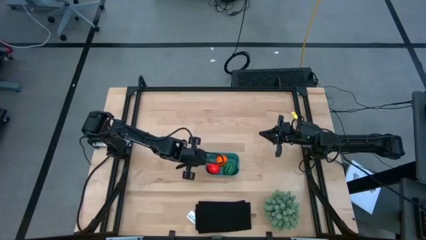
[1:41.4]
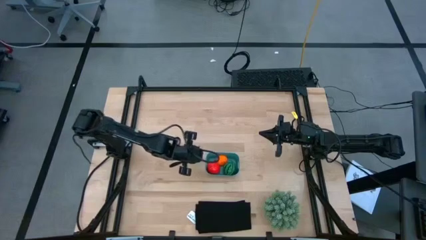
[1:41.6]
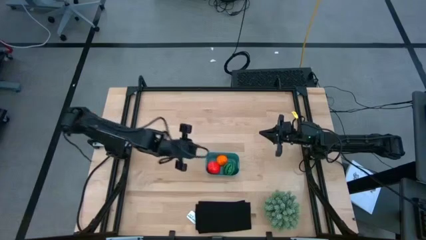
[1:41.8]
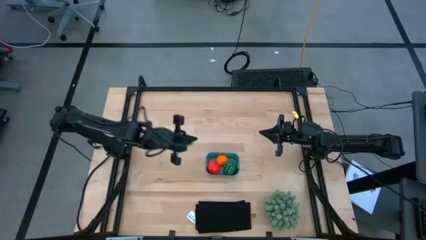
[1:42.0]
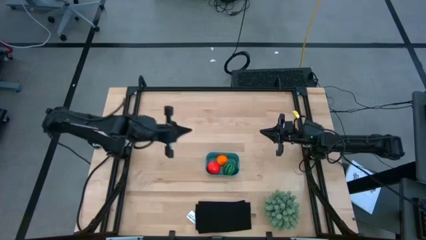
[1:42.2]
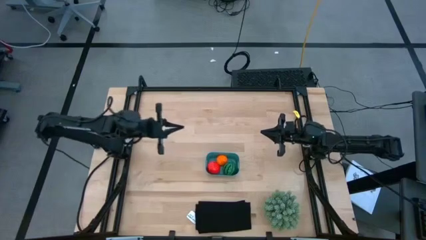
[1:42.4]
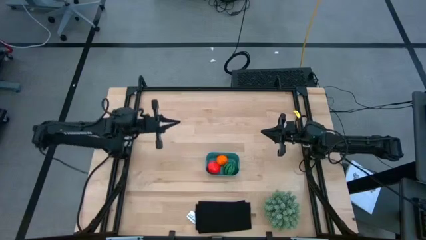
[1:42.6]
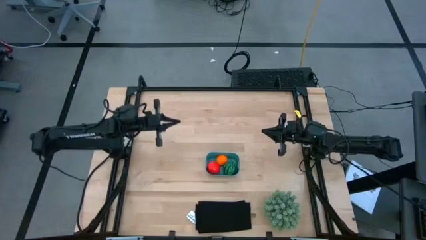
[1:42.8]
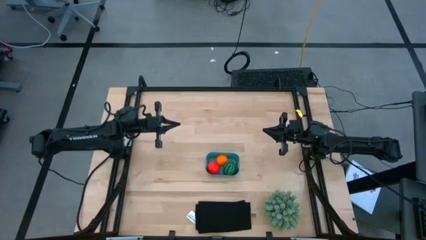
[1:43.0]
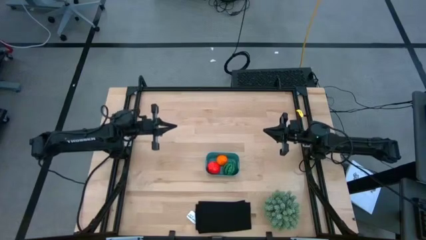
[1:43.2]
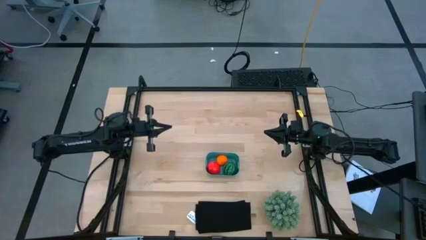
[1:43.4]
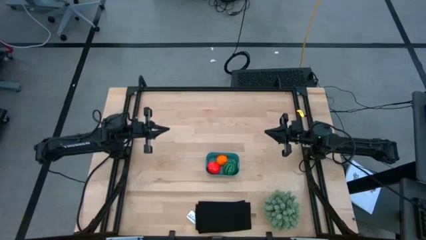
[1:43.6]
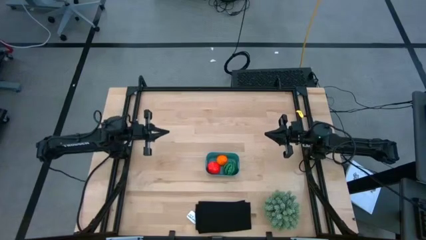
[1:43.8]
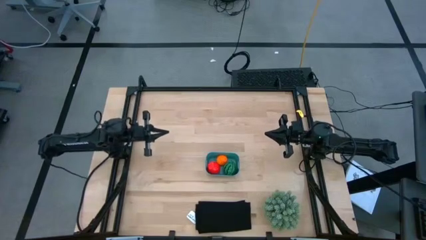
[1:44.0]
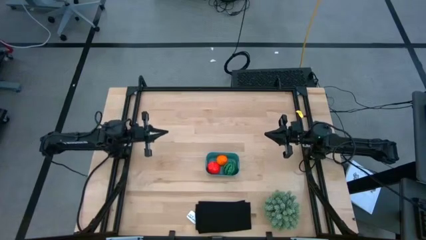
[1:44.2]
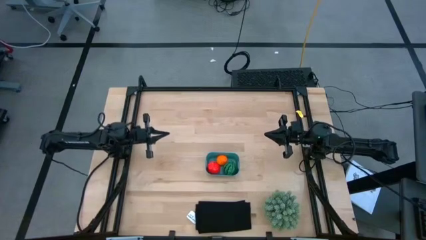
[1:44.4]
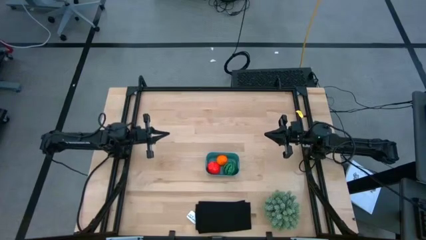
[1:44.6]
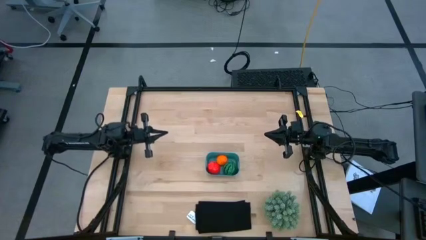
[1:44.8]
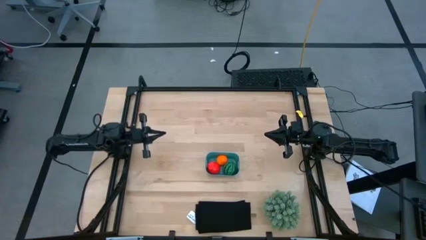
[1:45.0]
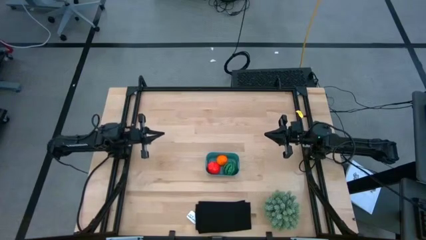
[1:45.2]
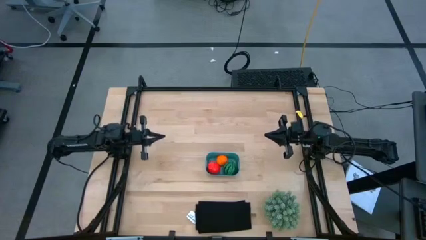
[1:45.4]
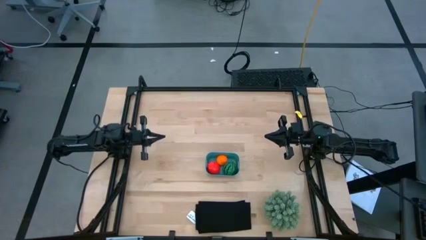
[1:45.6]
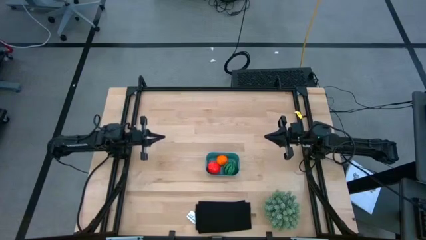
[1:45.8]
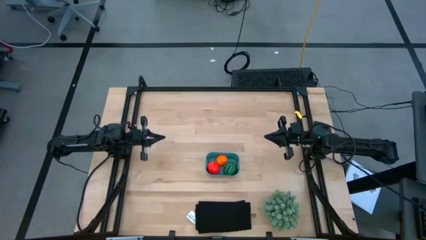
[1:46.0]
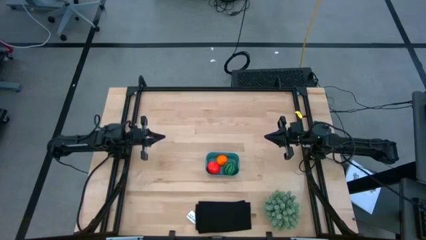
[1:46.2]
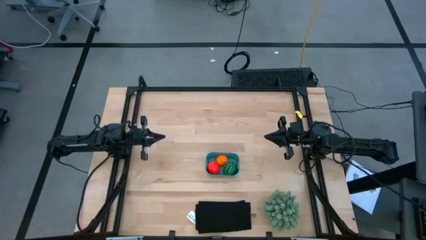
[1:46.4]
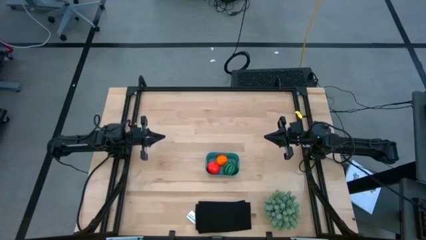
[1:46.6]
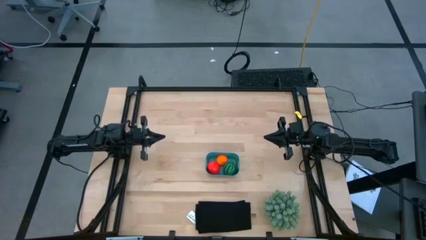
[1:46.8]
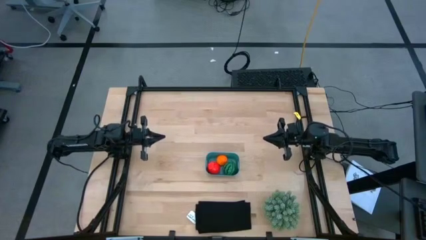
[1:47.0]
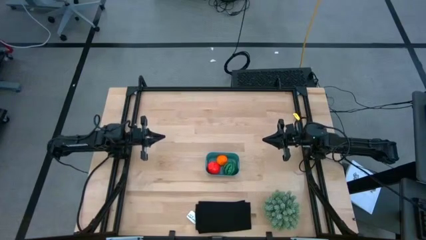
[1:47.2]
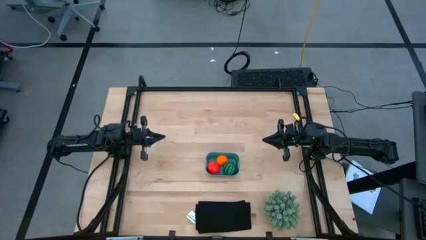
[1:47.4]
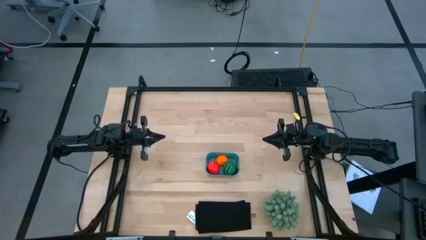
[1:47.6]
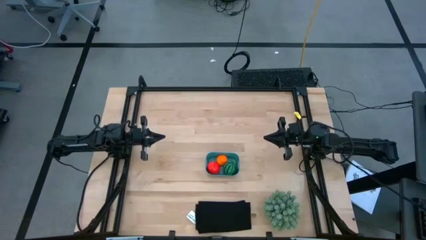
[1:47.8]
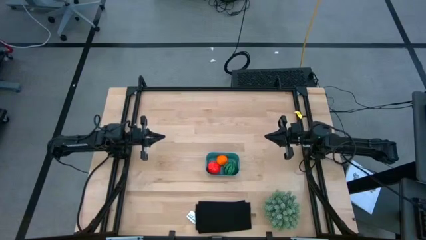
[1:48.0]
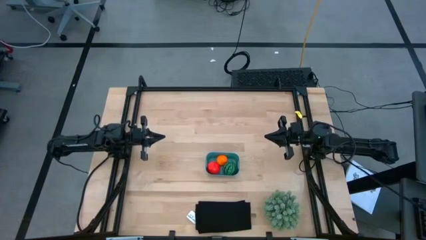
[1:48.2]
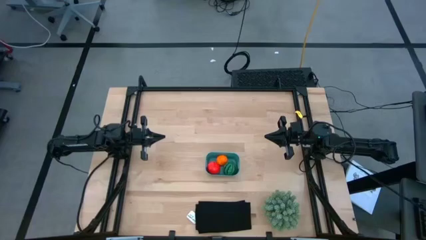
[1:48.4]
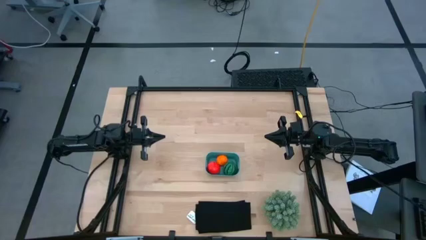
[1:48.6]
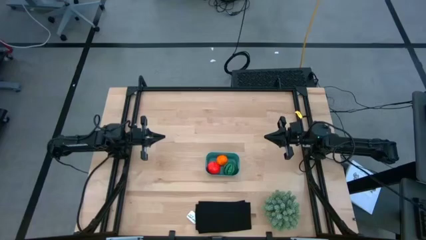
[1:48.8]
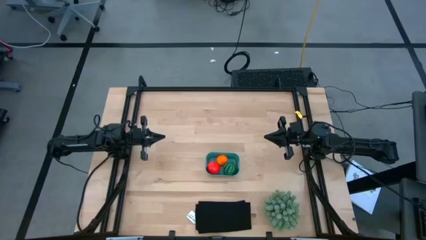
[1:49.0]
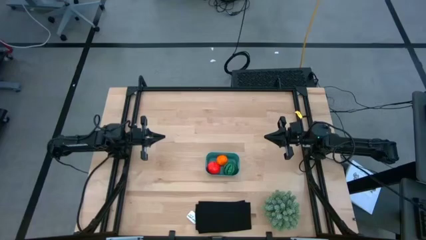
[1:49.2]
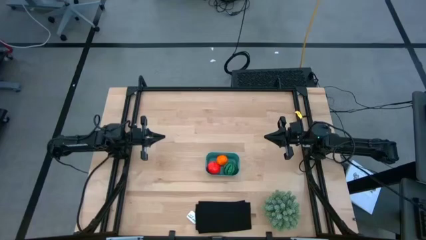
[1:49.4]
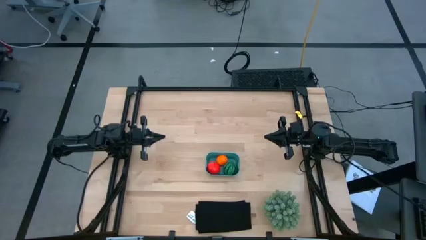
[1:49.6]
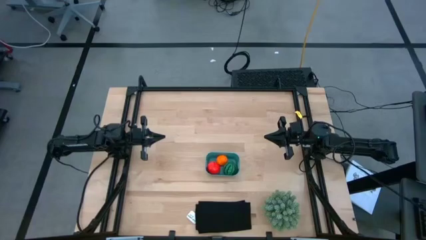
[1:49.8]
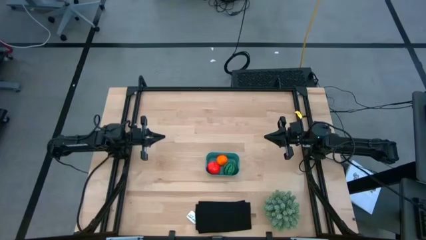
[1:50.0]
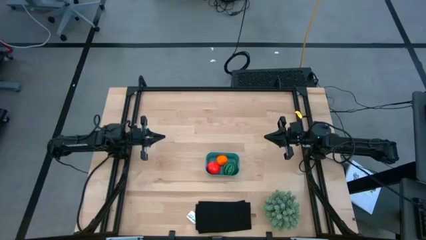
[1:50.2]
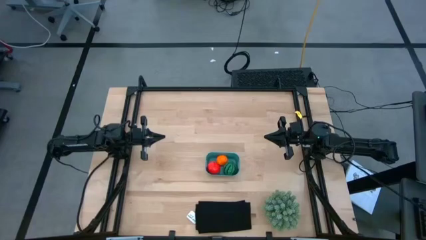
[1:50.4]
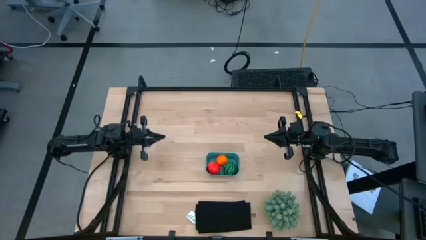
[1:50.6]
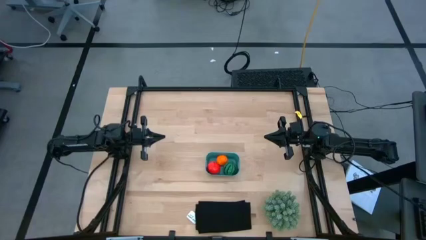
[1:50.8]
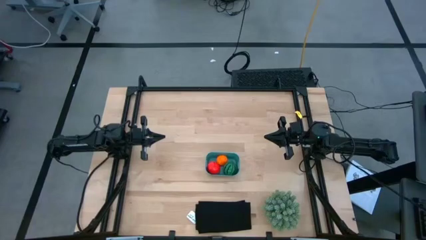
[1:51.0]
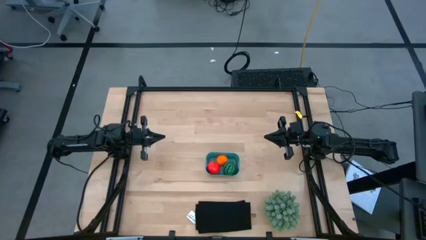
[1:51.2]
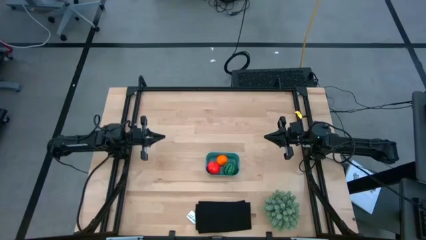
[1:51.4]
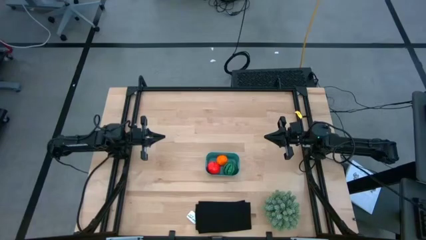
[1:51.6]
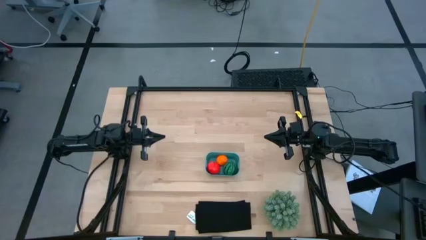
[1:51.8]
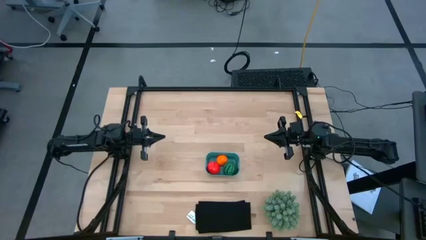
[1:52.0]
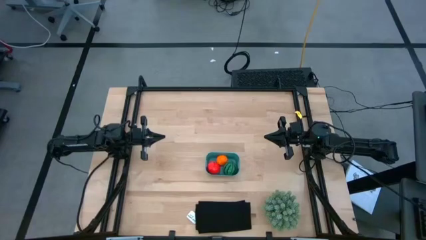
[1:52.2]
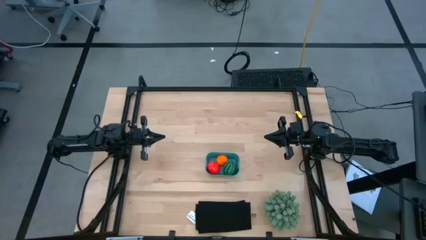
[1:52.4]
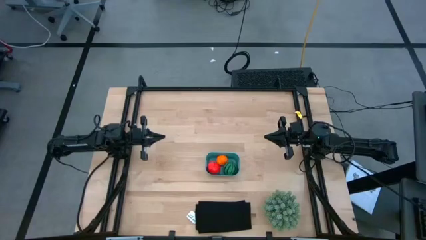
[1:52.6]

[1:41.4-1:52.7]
Task: Pick and placing Produce into tupperware
Return to Home Position

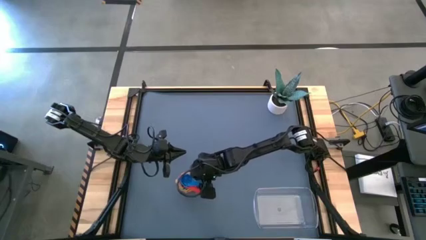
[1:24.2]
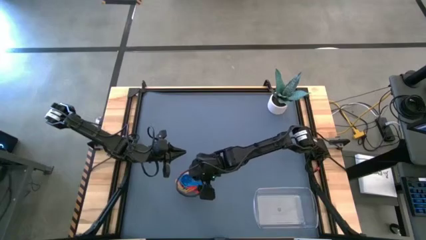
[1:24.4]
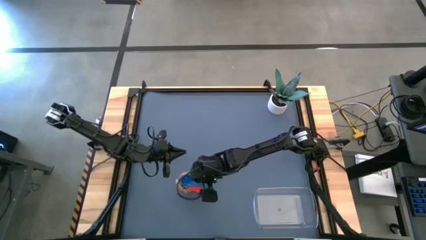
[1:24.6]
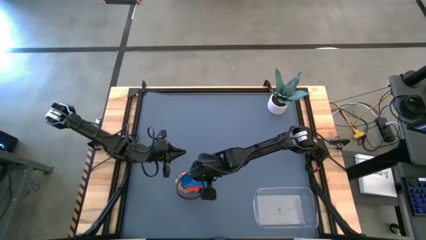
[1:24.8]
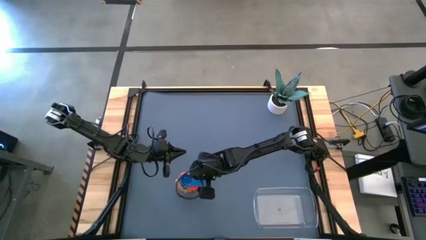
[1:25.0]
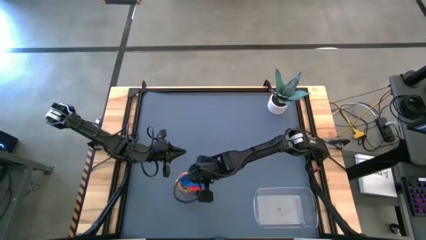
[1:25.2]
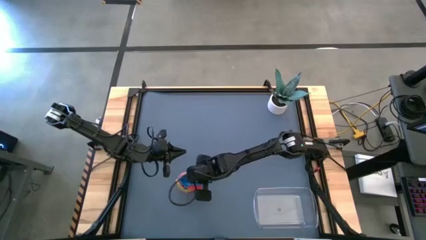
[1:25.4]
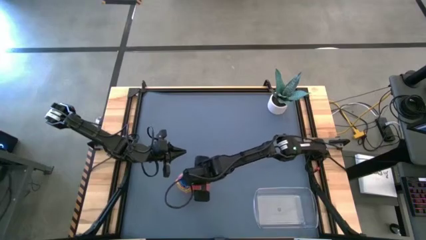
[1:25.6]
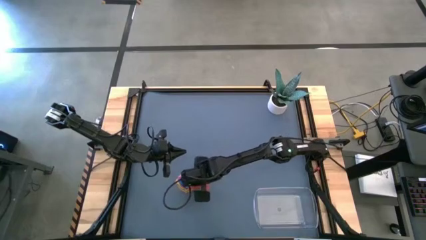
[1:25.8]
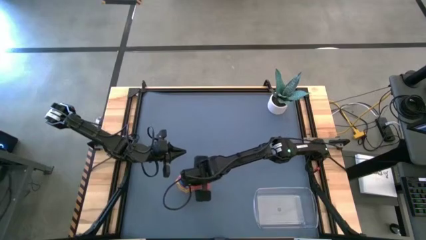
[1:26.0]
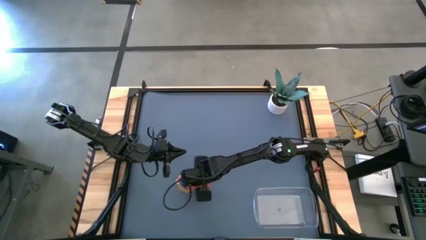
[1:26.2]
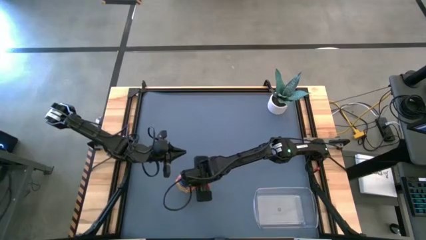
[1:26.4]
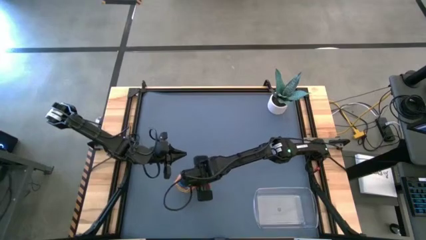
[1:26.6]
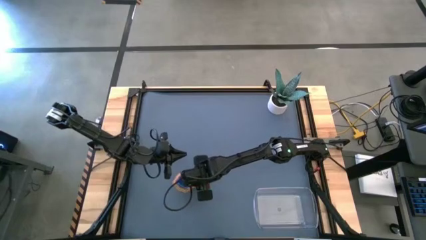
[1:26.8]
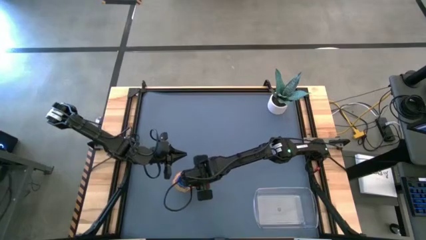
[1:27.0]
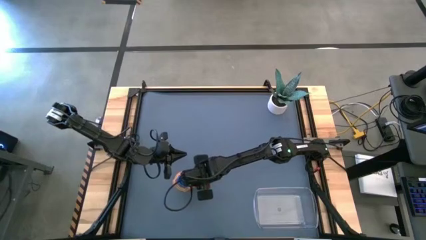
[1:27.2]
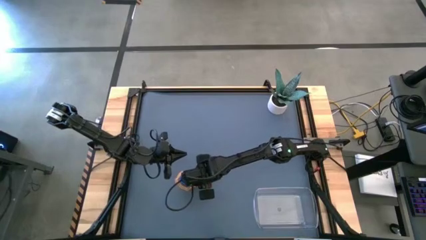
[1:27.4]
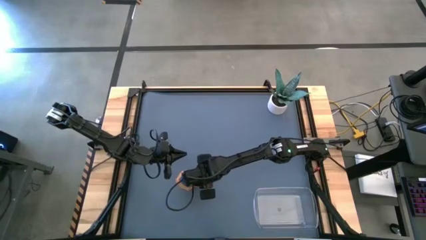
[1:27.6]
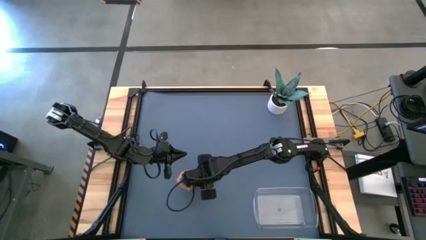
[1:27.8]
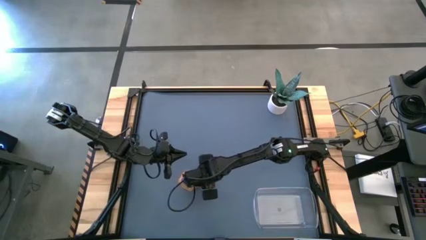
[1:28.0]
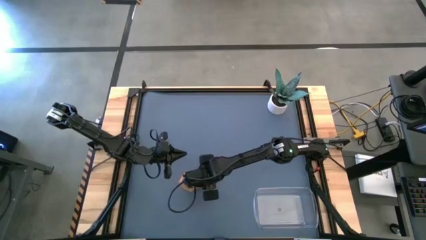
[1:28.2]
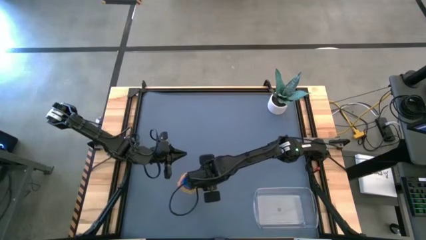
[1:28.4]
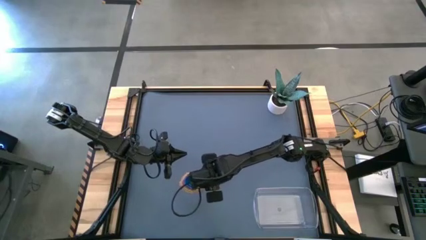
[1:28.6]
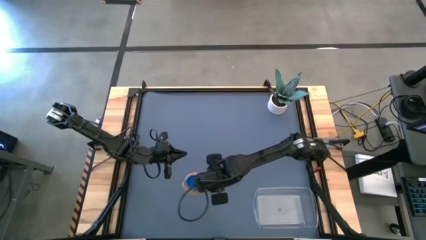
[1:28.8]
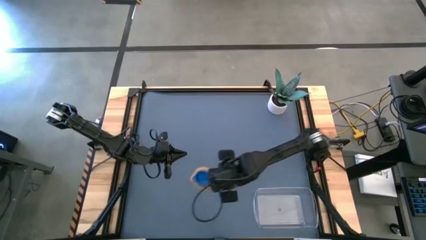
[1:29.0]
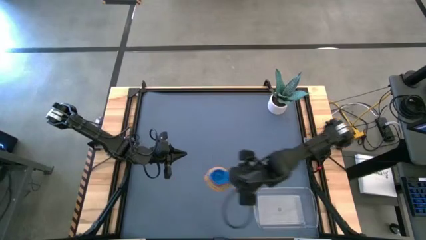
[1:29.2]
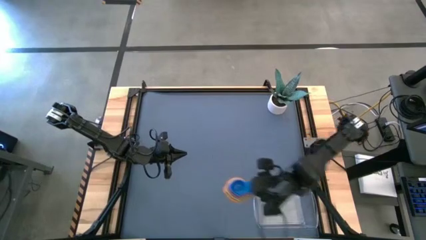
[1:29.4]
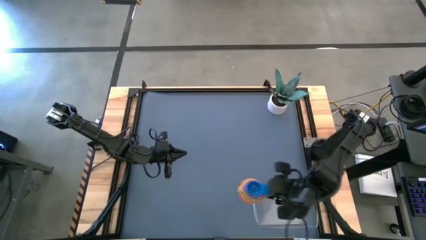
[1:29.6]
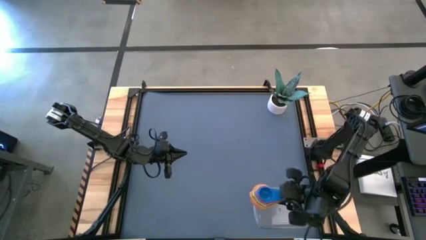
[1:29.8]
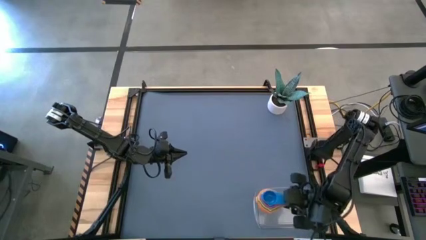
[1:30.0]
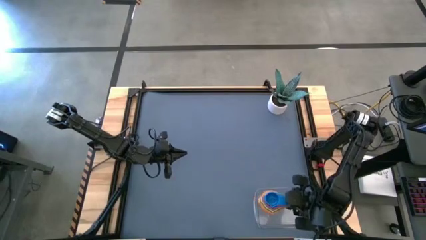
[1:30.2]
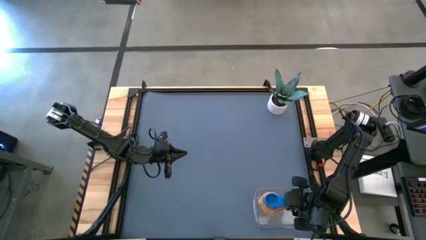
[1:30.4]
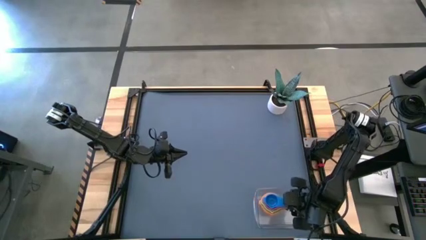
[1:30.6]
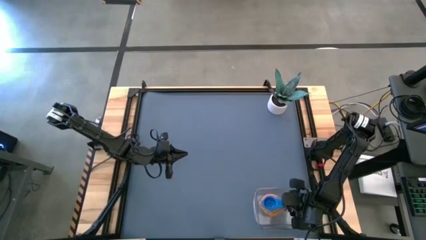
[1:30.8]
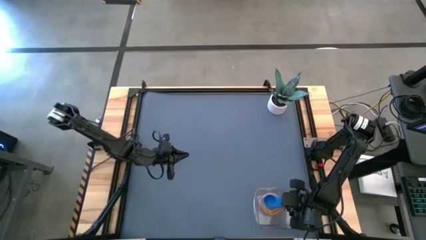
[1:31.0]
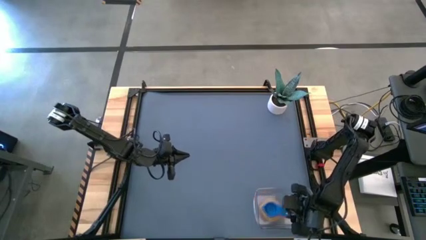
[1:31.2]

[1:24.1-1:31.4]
Task: Nest measuring cups in basket
Put the nested measuring cups into the transparent bin
